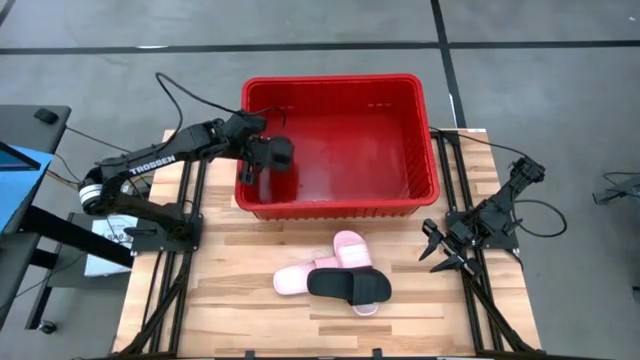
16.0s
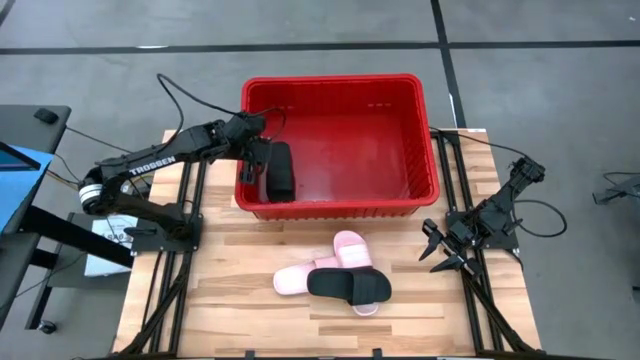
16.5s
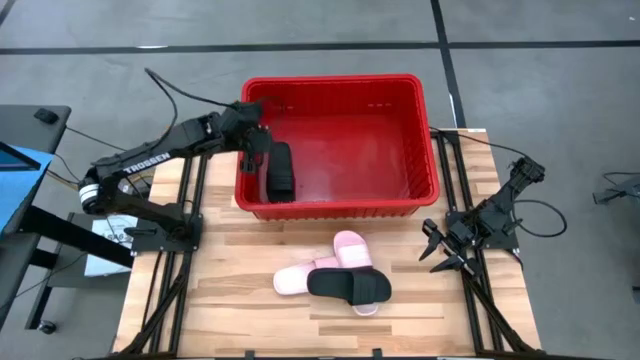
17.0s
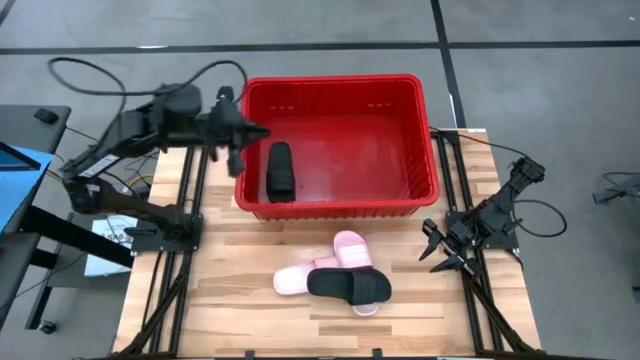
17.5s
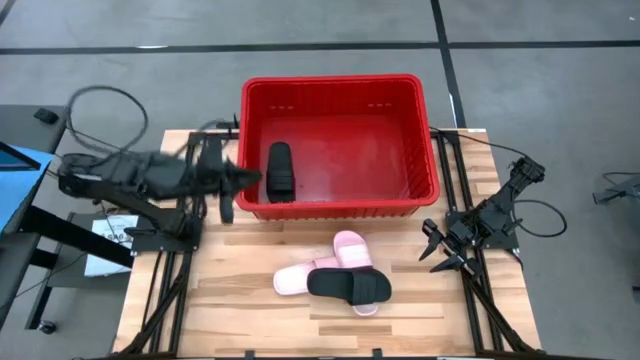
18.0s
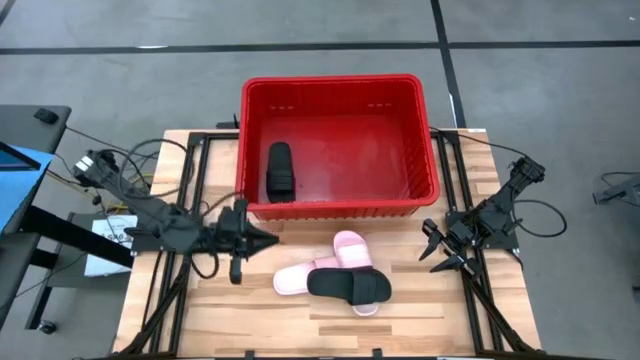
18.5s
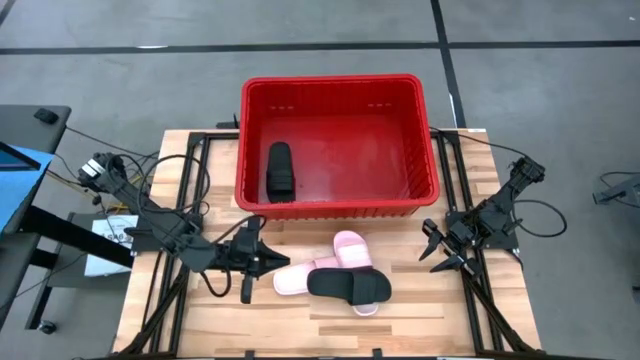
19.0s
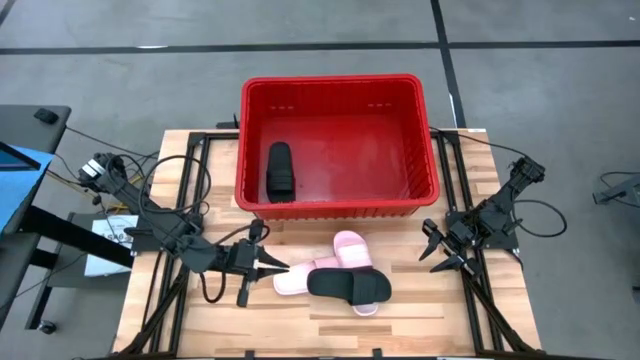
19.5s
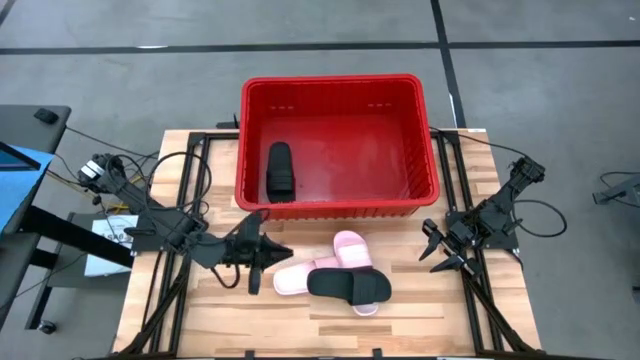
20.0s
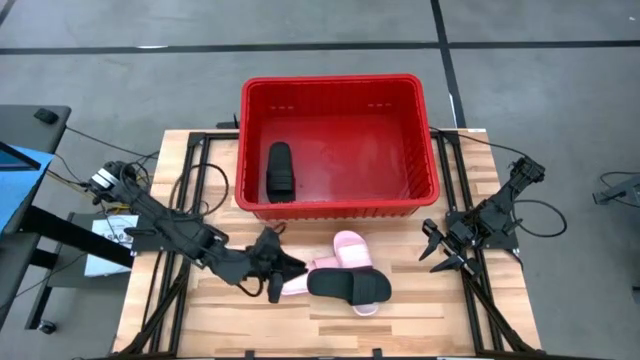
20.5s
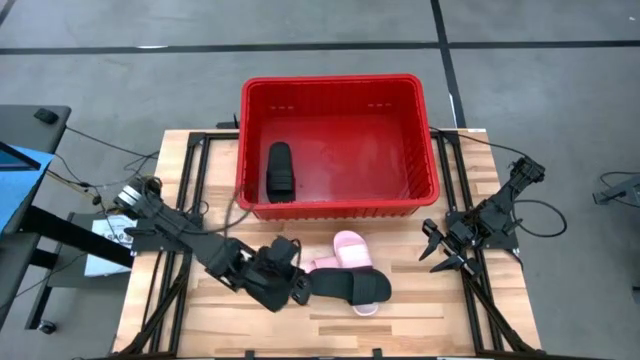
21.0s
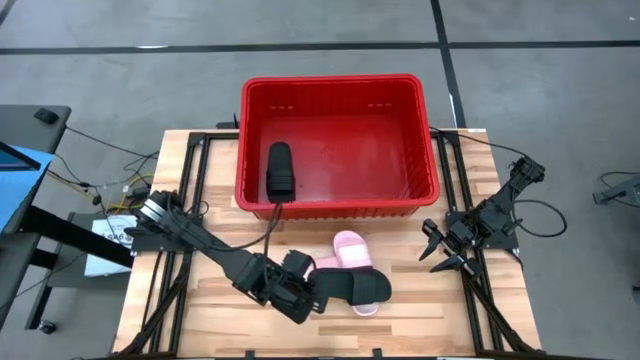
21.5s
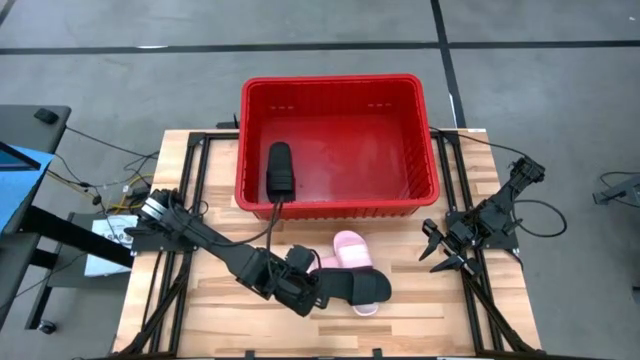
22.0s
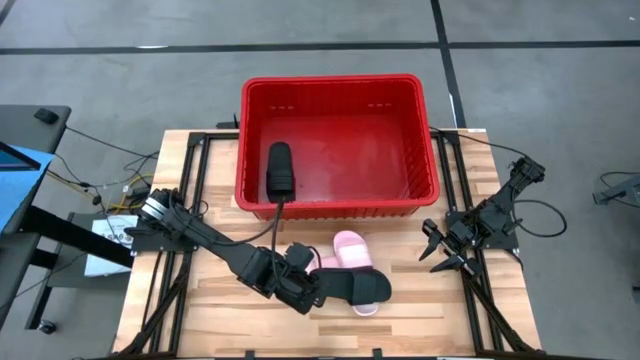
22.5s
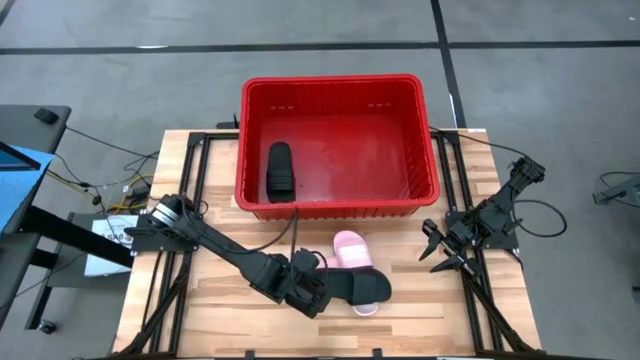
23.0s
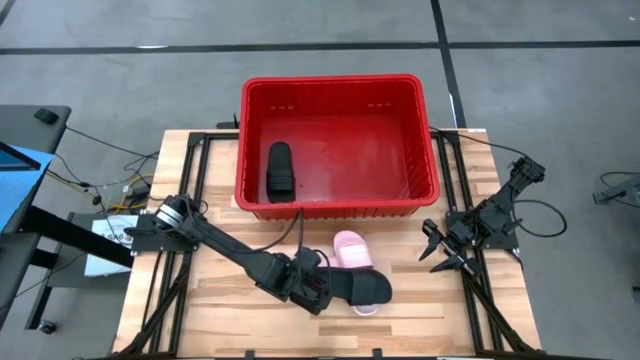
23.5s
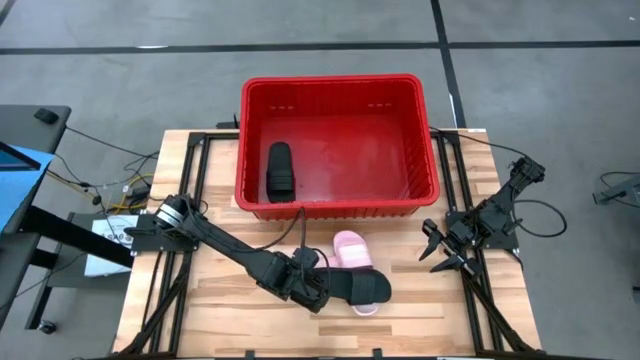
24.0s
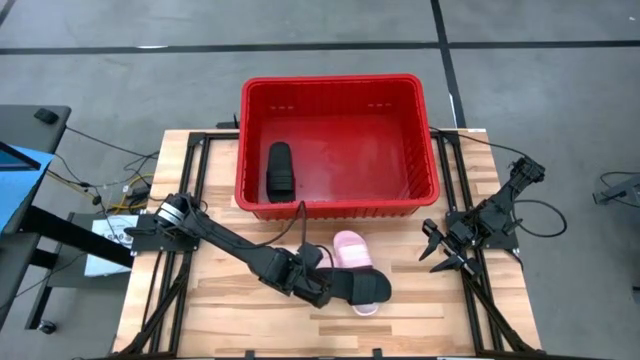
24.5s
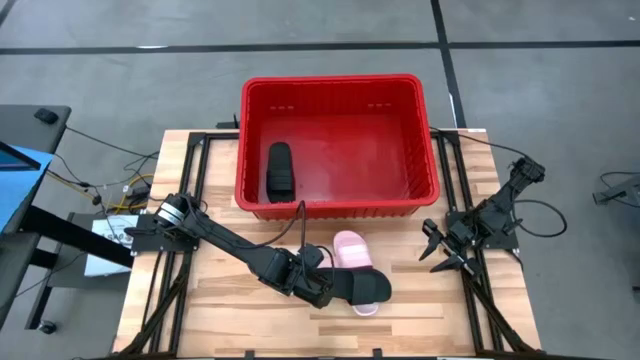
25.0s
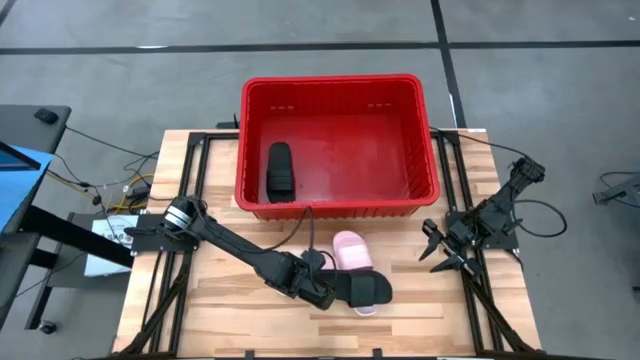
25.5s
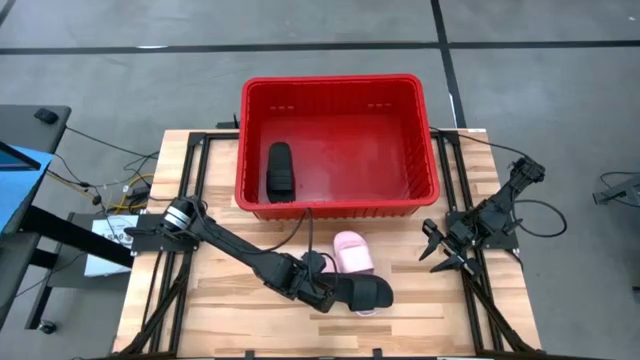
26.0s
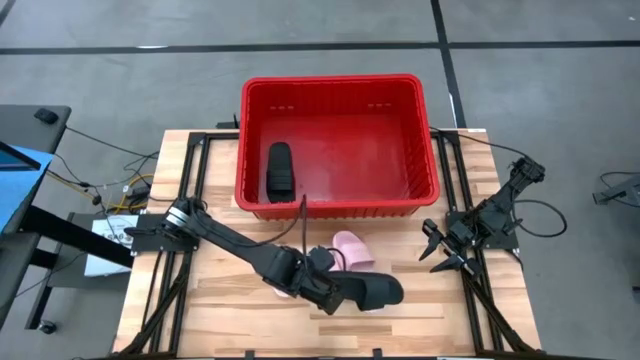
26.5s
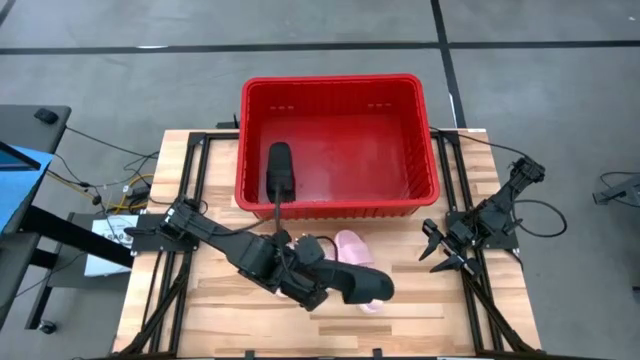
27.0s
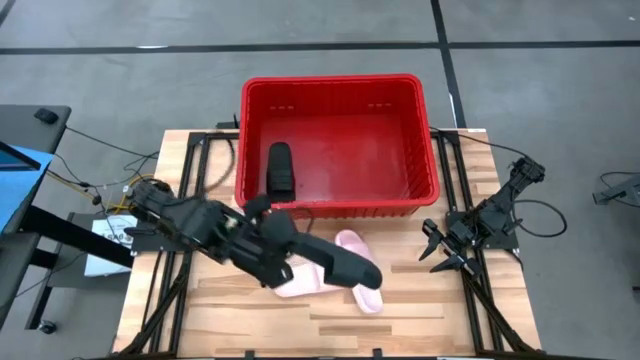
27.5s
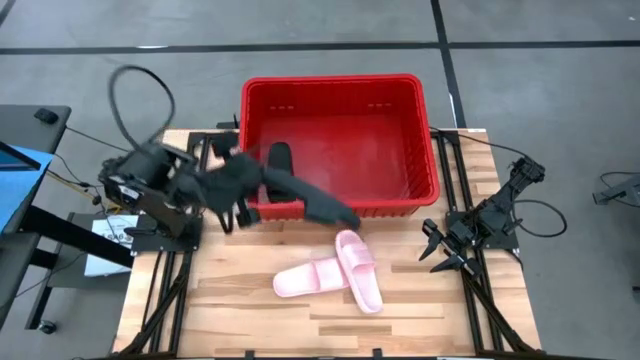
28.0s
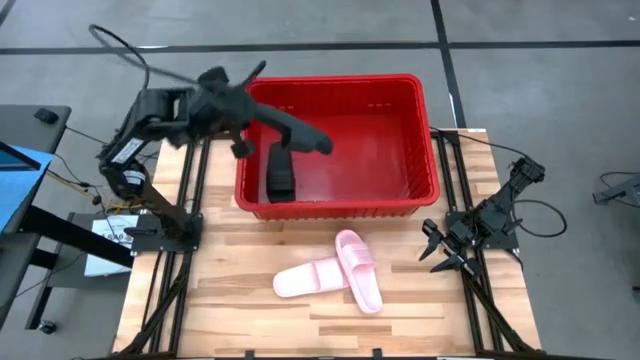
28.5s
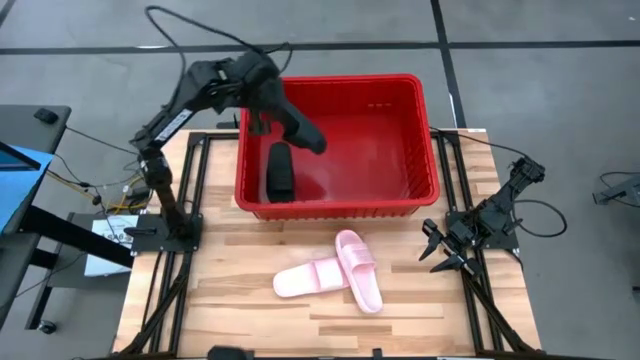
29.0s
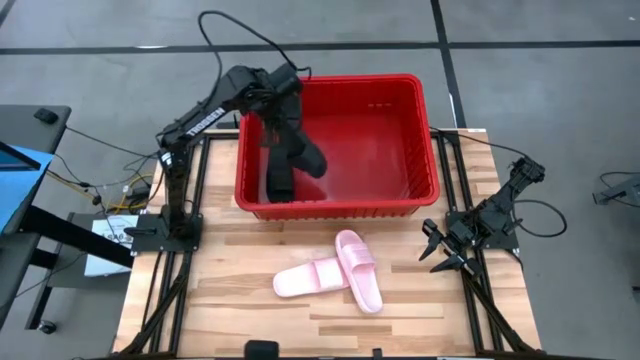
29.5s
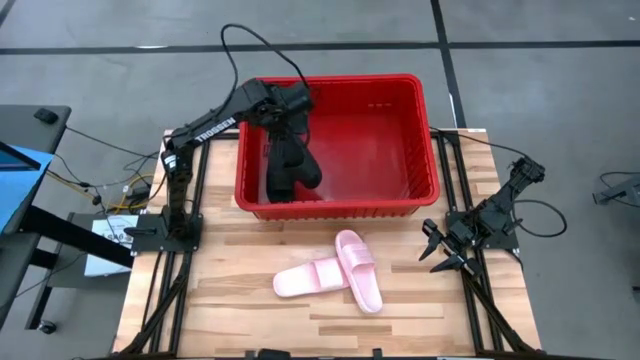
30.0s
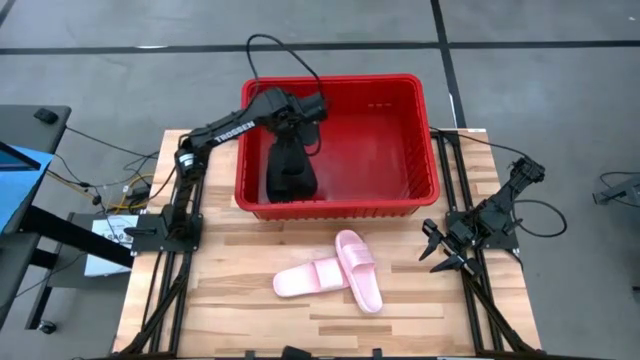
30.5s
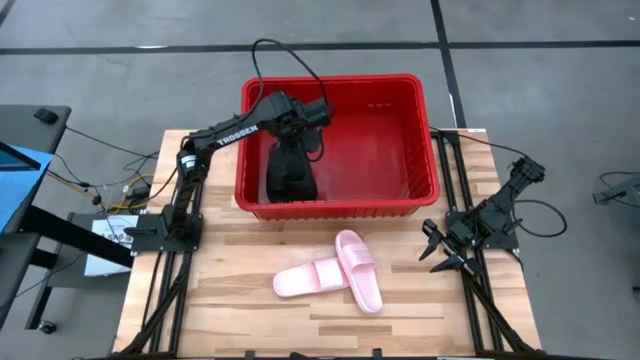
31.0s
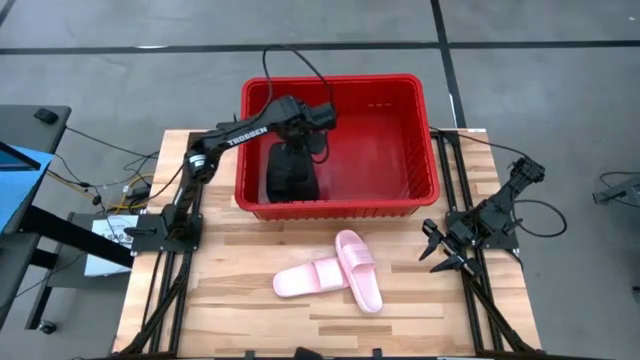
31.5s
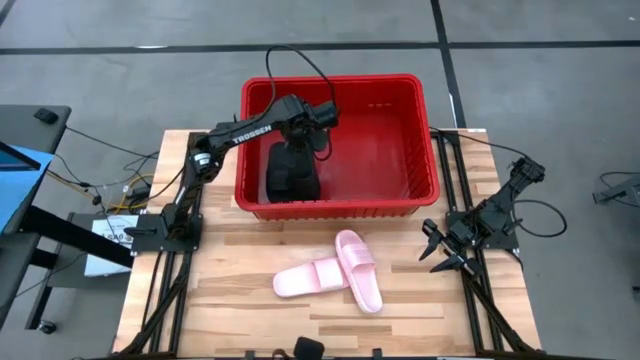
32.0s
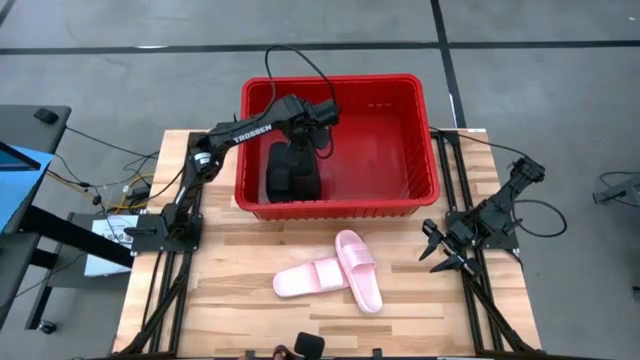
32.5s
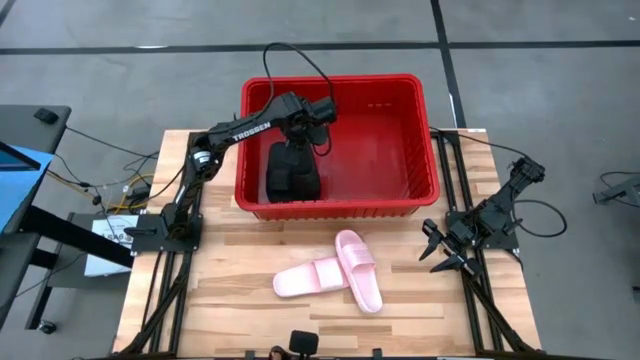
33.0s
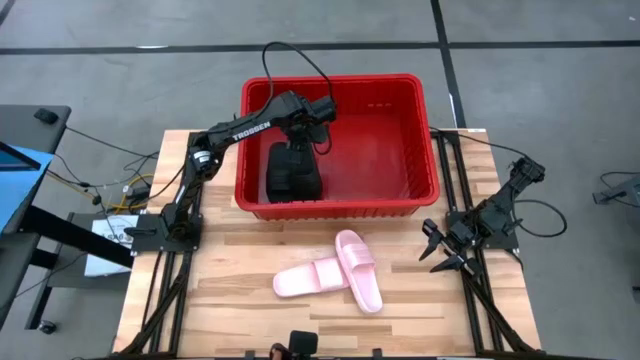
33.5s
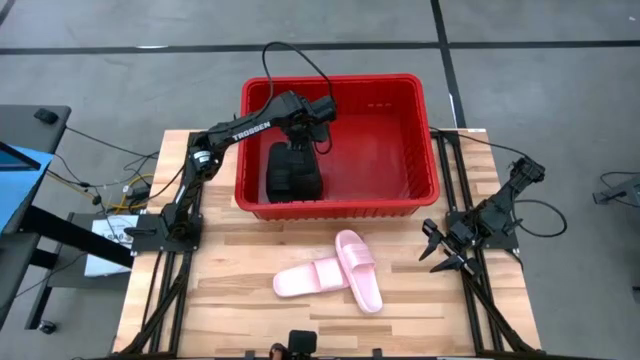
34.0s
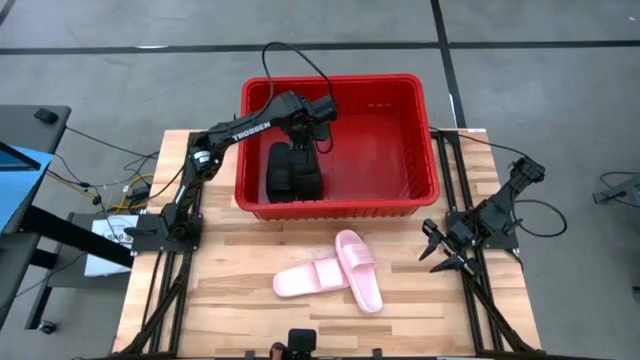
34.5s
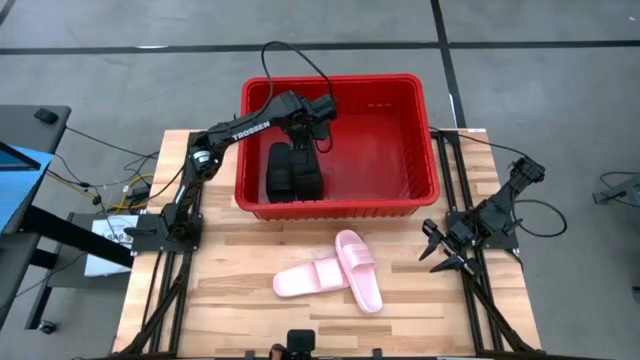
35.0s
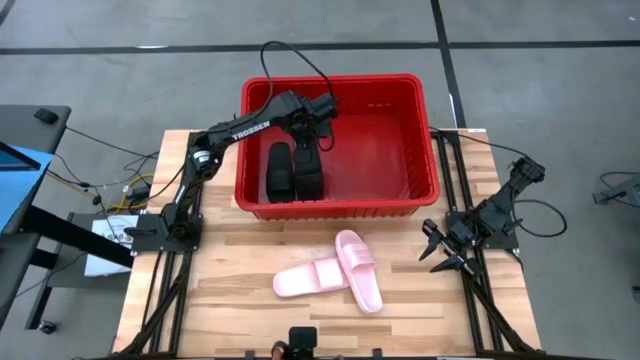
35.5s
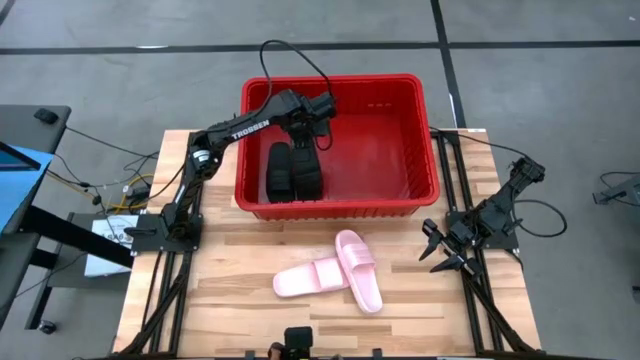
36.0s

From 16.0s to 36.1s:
Task: Pick and place slides into bin
Put the black slide into the red container
